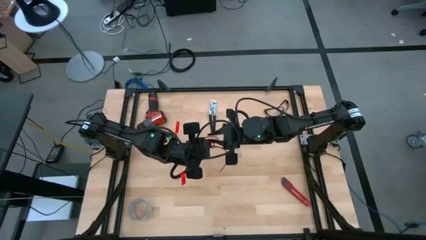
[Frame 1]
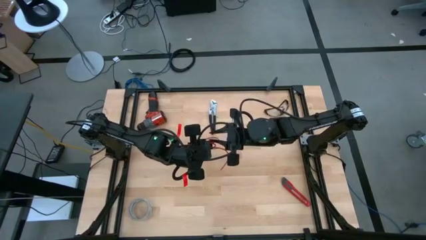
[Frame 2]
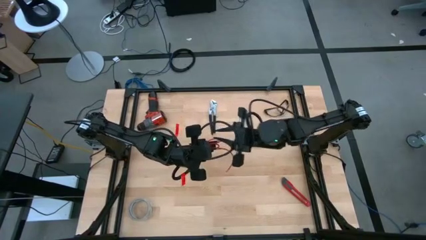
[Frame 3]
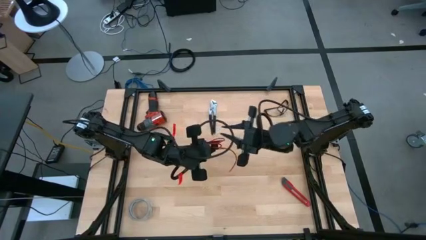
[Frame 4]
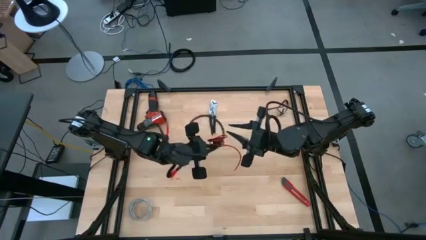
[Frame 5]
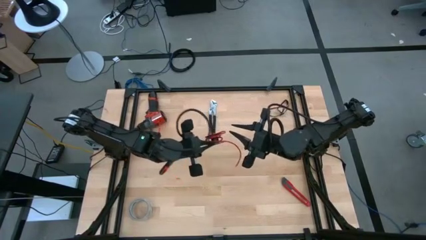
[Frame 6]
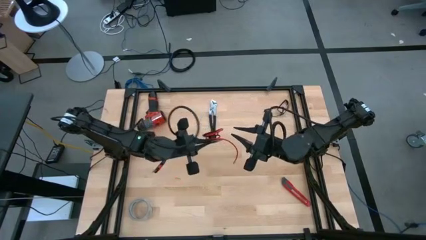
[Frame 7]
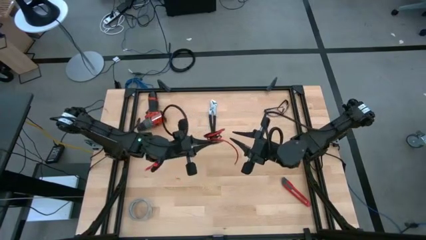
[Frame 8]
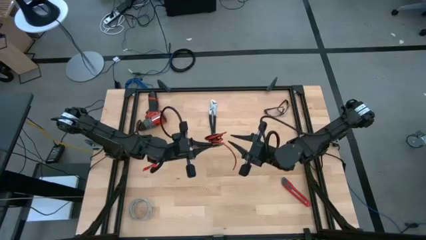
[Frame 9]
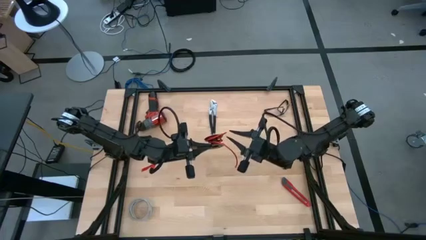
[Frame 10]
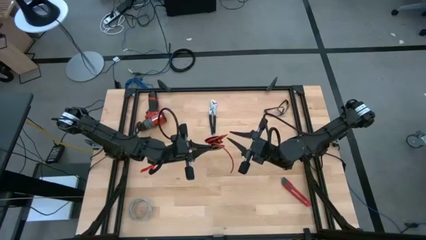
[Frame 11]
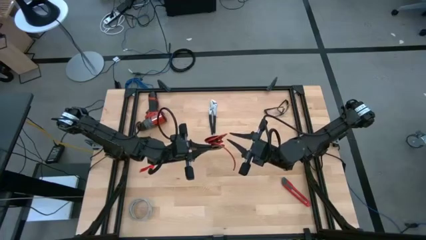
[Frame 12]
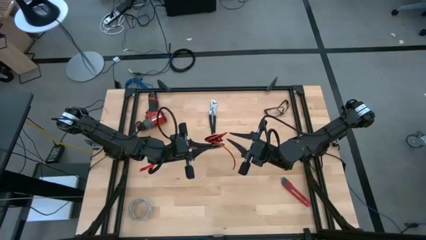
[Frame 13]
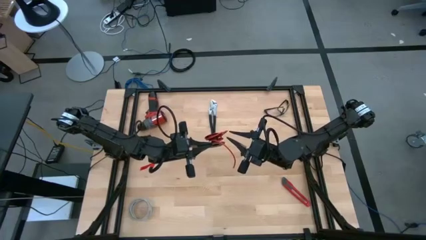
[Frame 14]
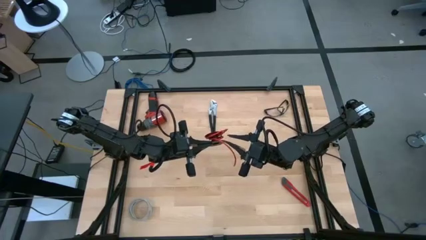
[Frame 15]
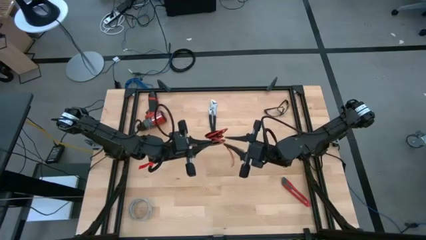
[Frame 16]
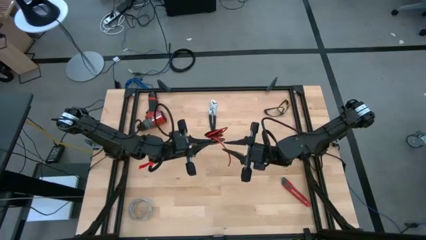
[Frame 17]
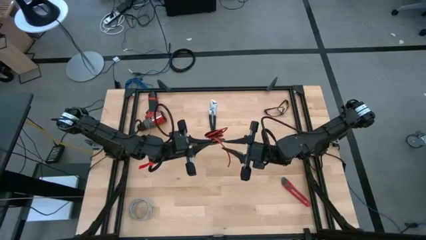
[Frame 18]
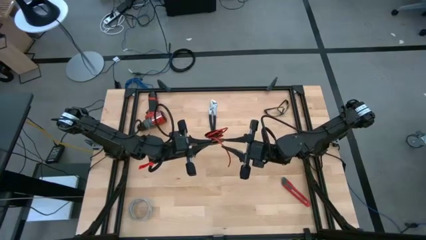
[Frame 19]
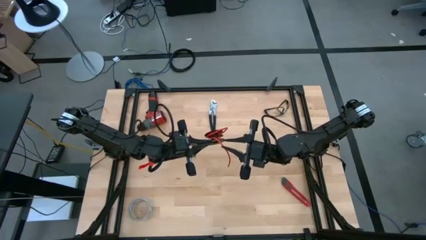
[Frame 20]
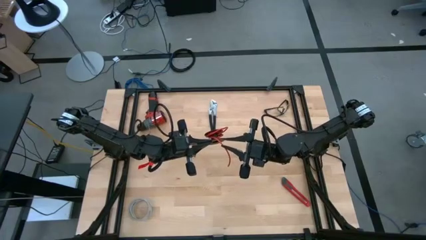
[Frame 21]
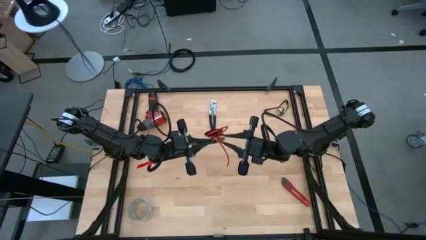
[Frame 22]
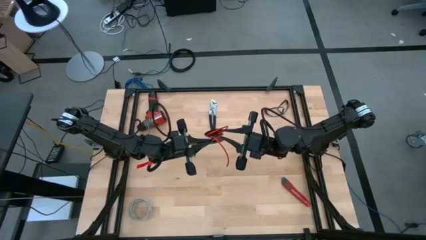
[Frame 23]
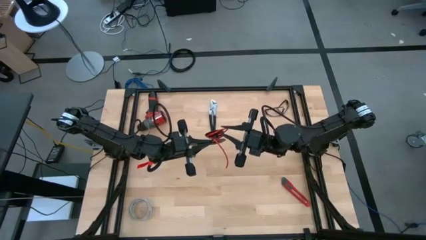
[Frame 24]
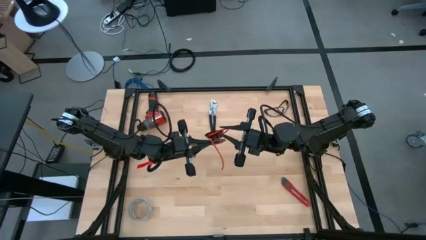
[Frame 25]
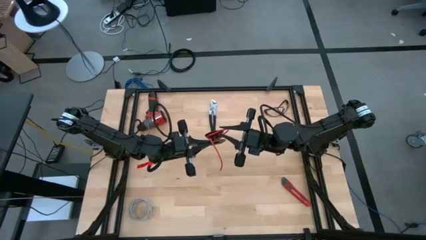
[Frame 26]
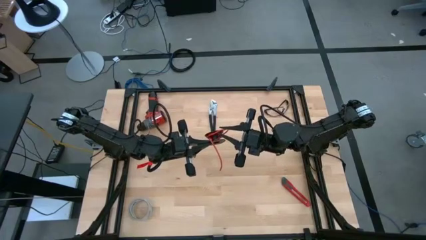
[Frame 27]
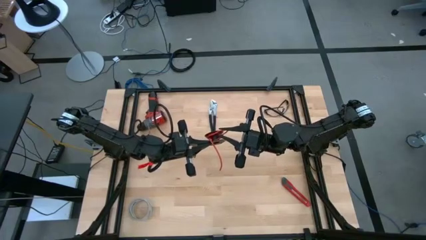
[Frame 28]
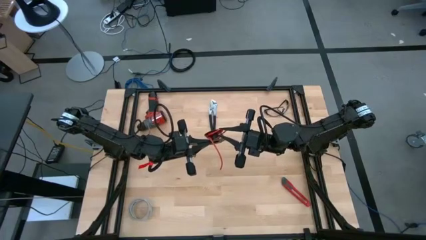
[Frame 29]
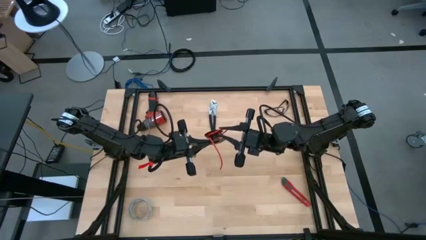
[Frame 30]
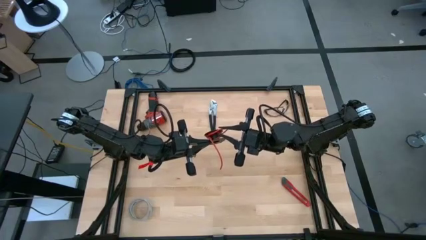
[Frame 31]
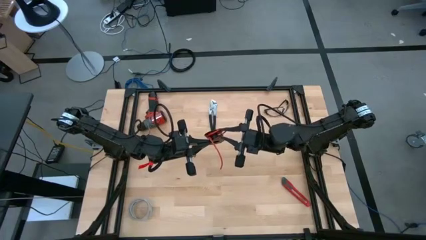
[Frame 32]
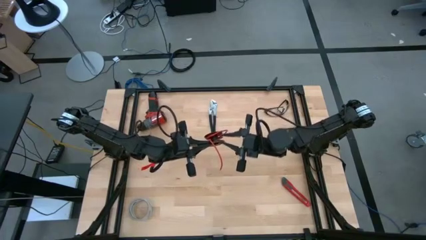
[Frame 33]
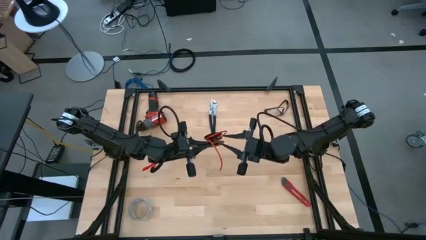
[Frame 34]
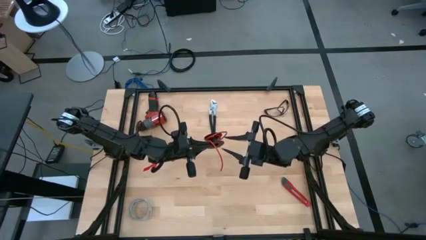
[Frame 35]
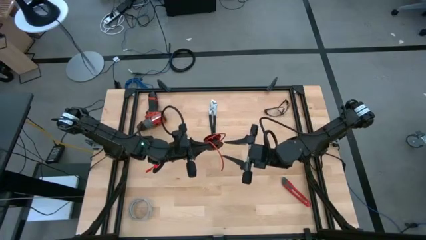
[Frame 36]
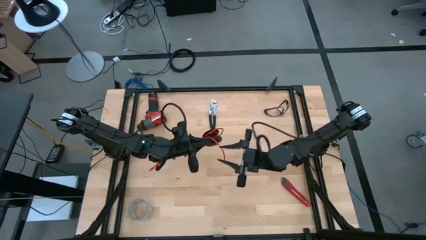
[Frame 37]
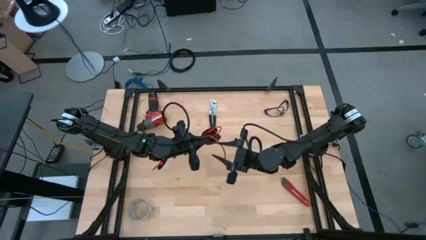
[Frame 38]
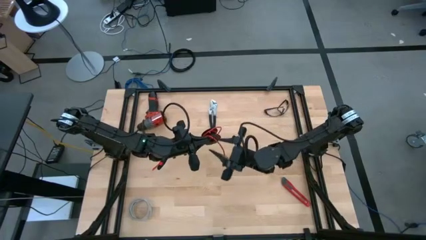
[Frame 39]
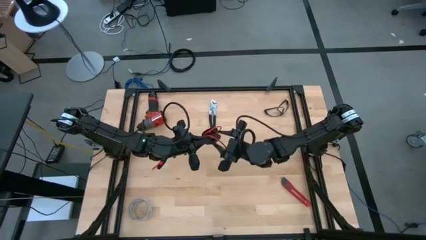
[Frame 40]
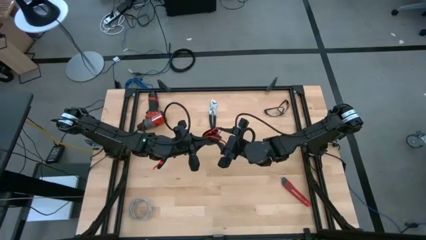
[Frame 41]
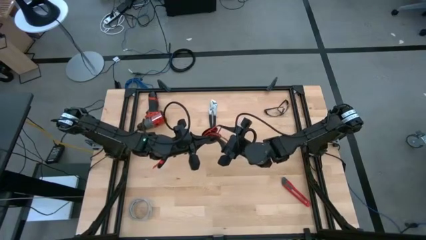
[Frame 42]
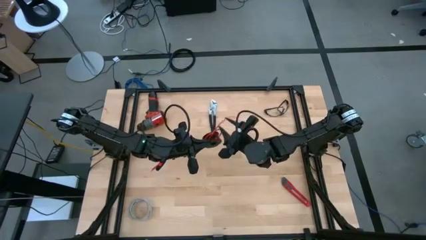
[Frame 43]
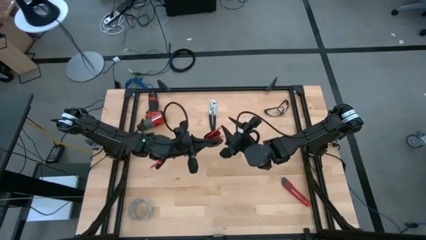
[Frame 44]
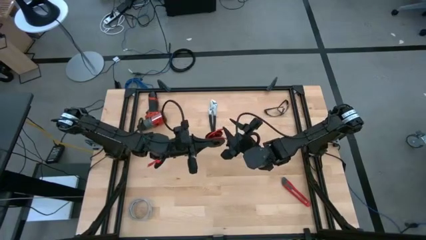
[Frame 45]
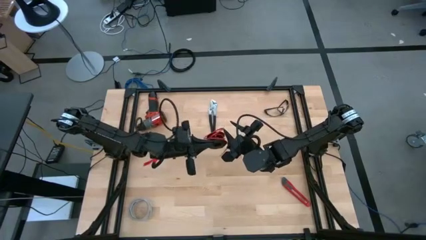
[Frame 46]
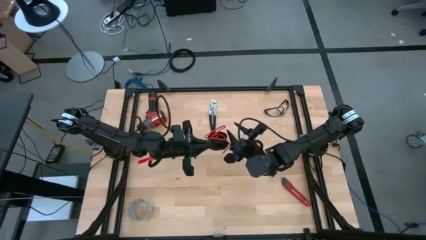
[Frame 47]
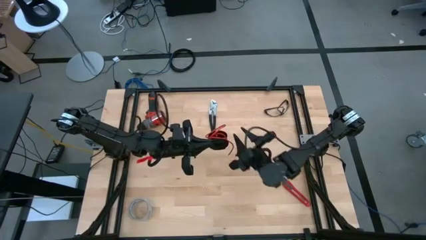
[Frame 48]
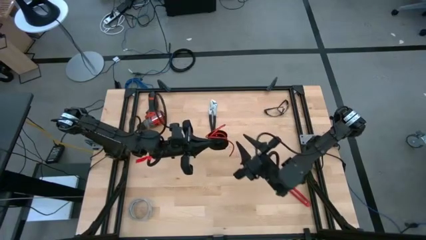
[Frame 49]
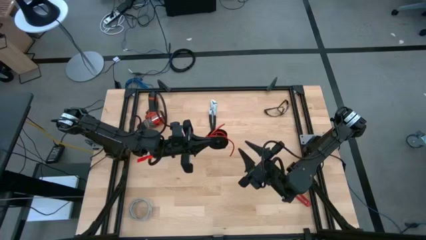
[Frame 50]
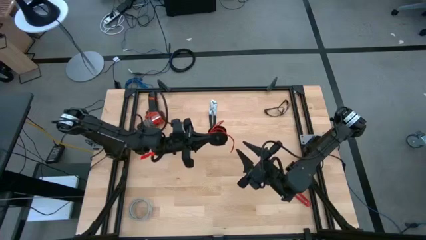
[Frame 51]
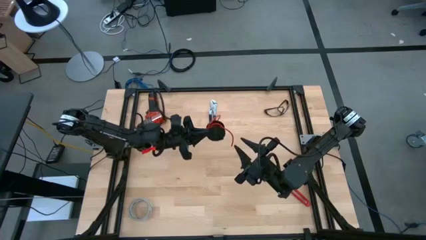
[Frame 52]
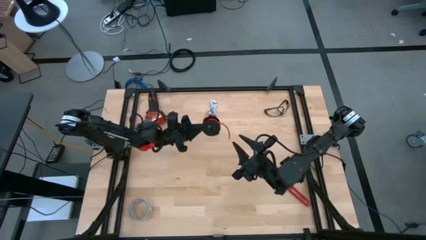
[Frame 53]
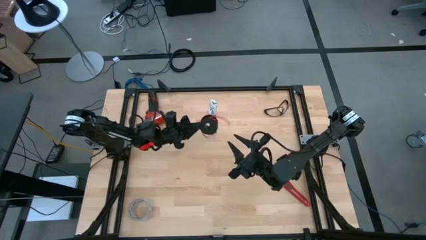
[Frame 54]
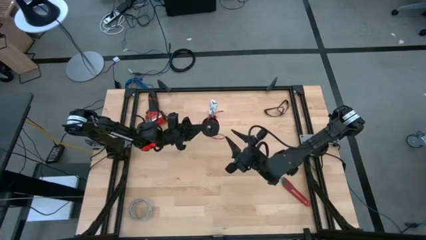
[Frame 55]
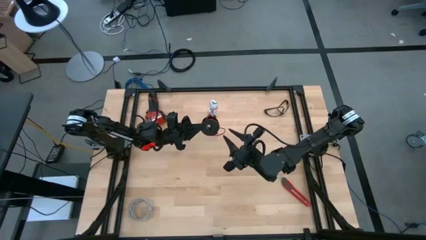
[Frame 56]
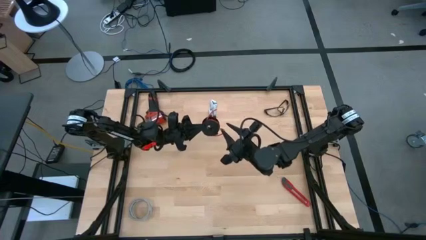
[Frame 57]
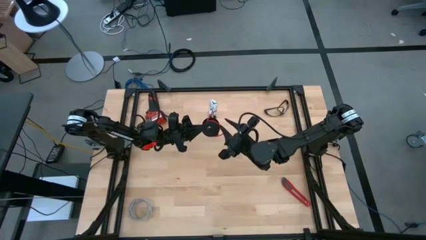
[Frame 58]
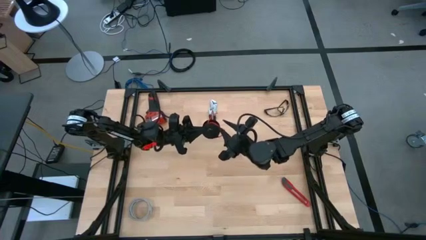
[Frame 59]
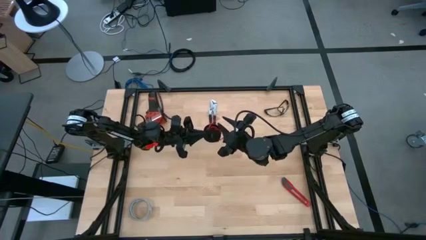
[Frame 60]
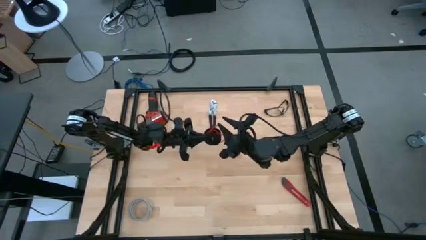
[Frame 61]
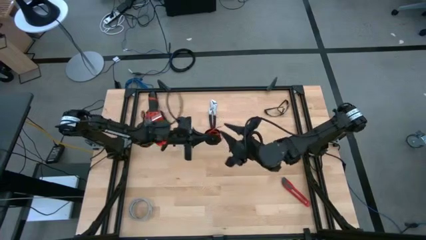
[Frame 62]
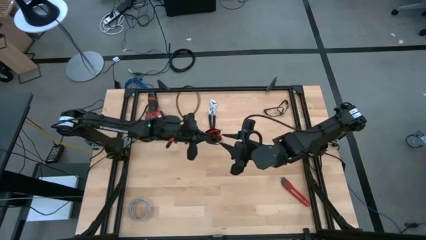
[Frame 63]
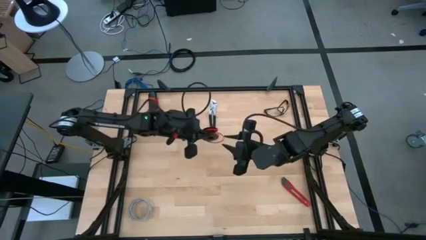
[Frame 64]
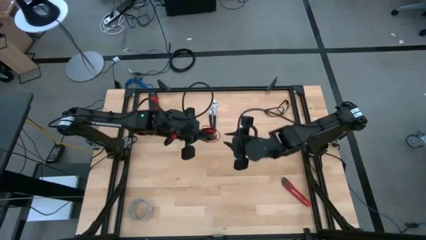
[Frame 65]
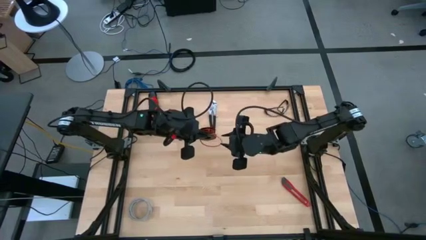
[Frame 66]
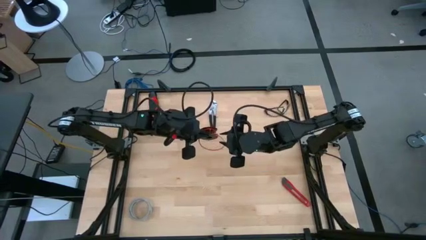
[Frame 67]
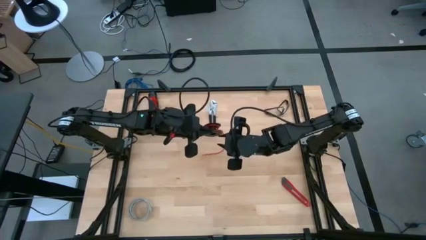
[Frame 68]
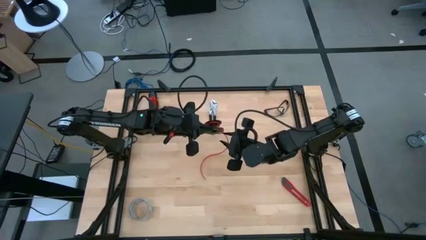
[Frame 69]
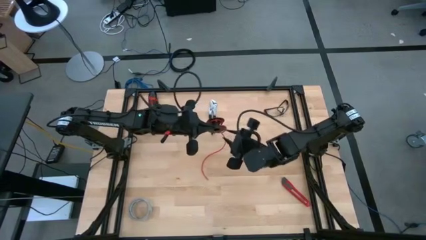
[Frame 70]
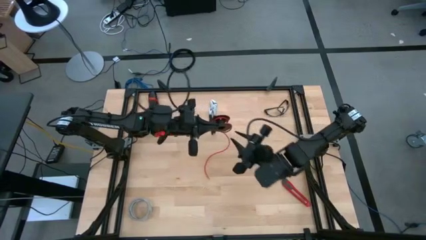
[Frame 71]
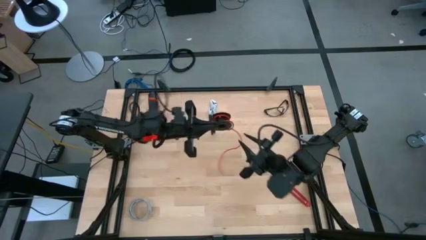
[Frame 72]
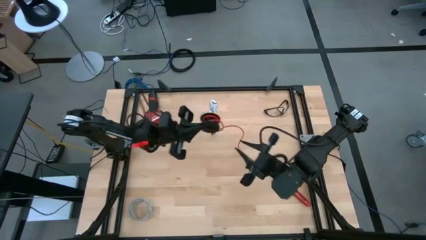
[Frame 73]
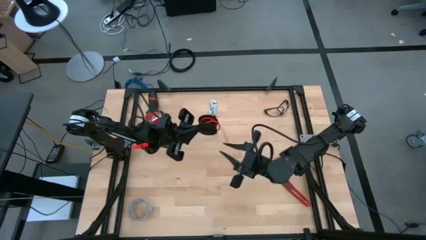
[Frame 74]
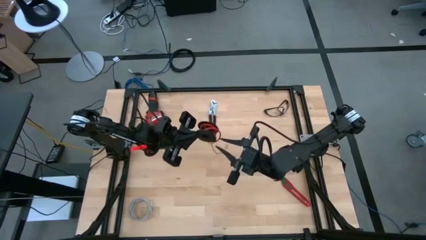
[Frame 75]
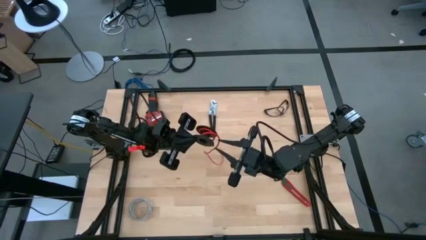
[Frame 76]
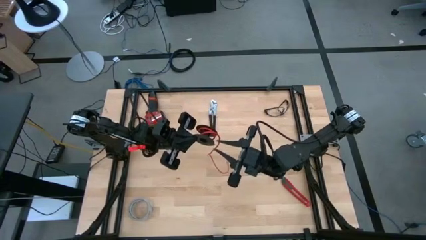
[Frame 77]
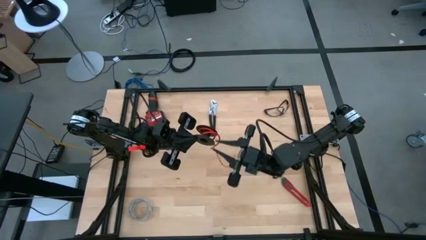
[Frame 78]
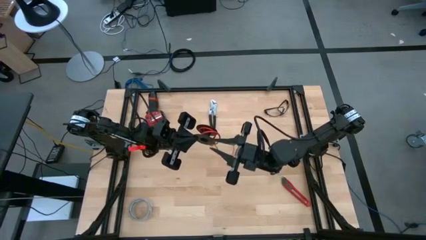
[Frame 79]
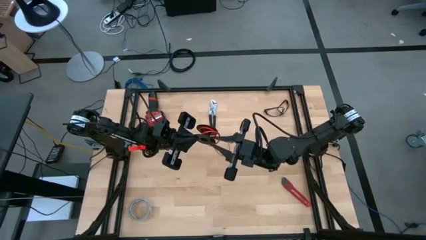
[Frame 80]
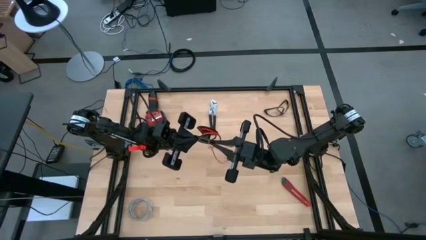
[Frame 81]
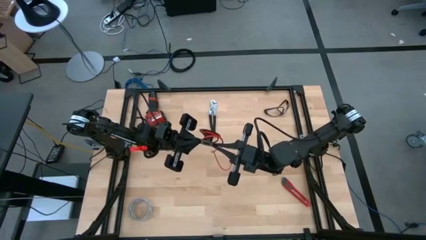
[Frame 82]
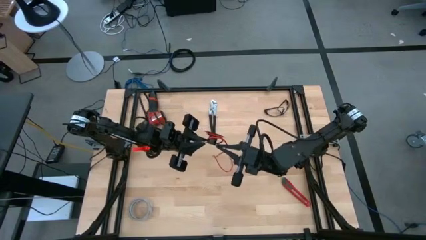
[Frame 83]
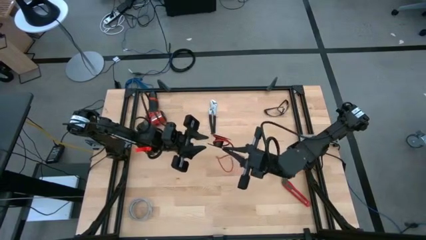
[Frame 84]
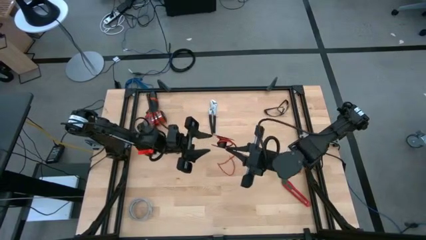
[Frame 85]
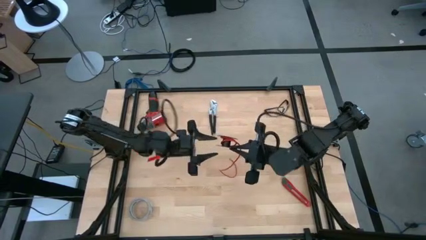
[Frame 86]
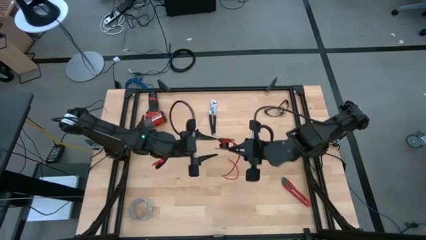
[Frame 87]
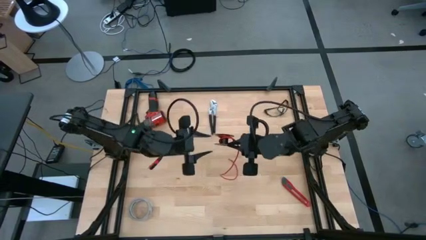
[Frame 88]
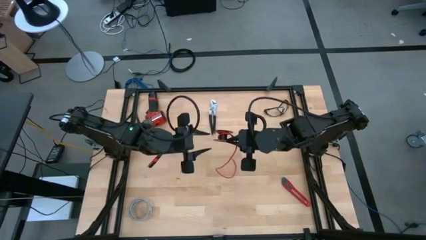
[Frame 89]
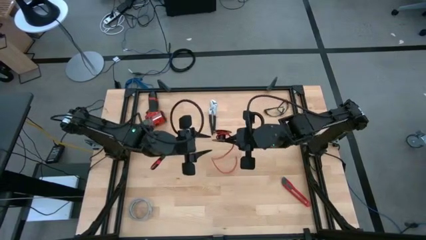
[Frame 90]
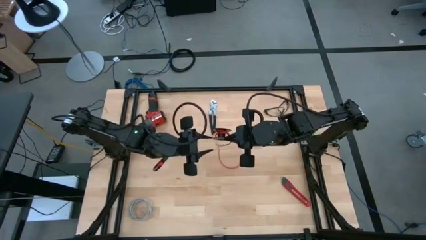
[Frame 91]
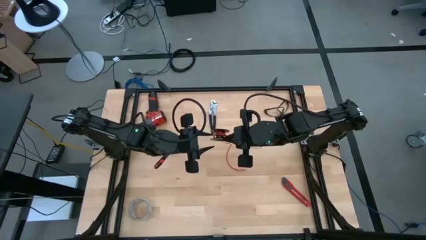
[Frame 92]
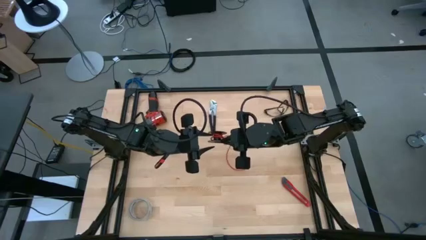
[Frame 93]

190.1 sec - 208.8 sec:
Task: Coil cords
Coil the red wire onto the black spool
